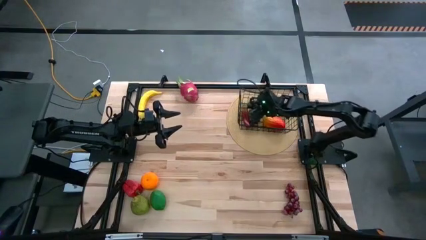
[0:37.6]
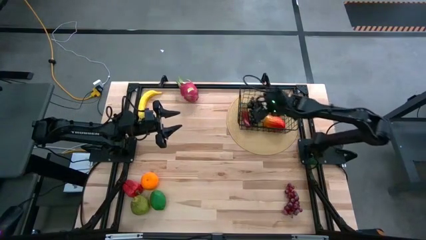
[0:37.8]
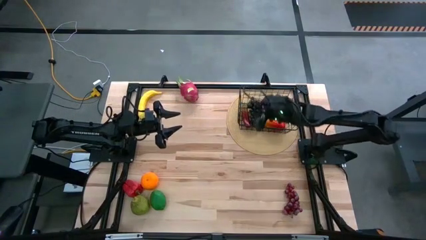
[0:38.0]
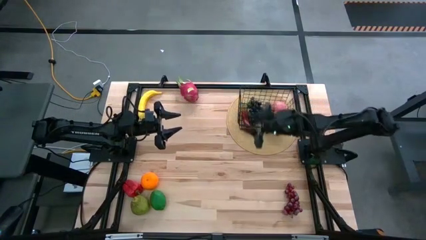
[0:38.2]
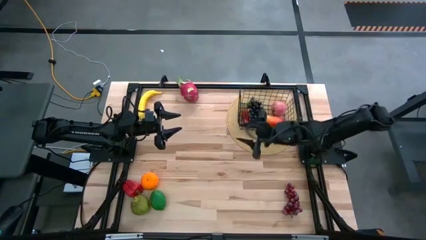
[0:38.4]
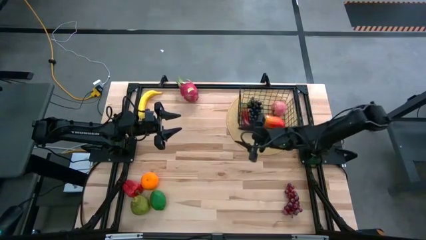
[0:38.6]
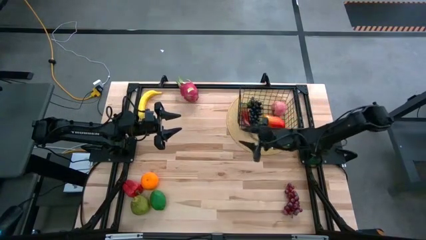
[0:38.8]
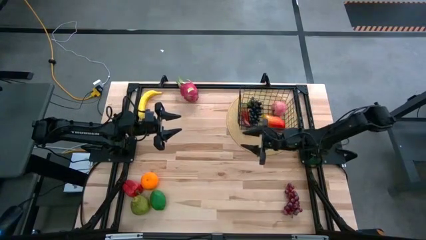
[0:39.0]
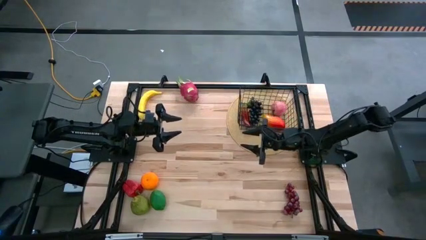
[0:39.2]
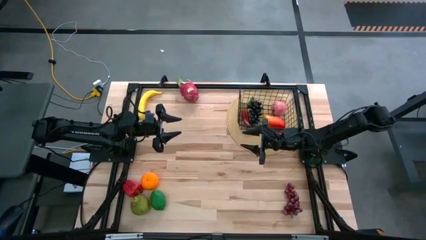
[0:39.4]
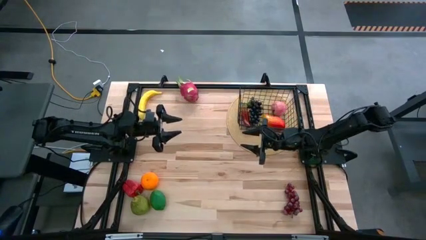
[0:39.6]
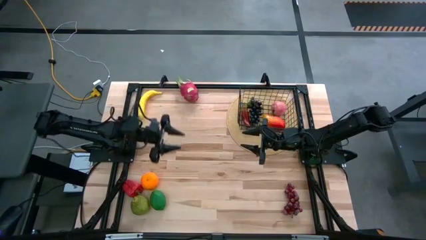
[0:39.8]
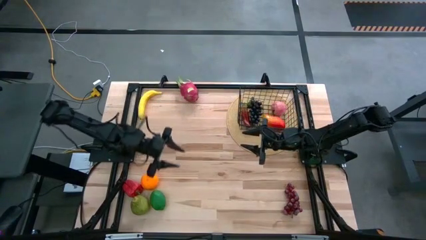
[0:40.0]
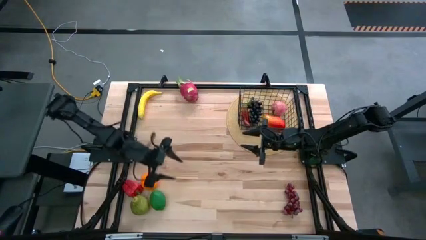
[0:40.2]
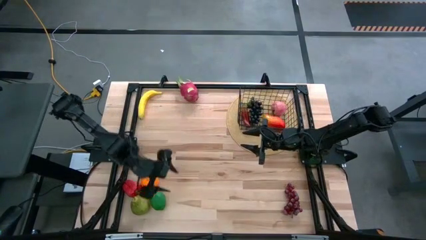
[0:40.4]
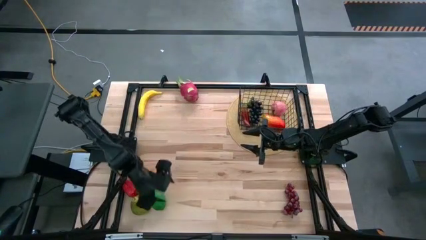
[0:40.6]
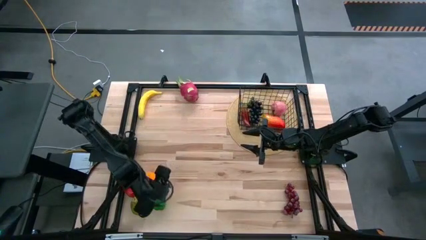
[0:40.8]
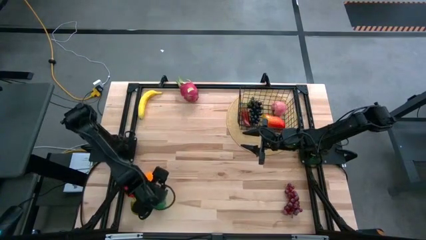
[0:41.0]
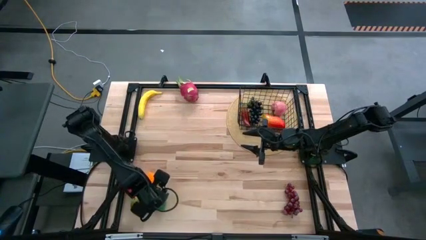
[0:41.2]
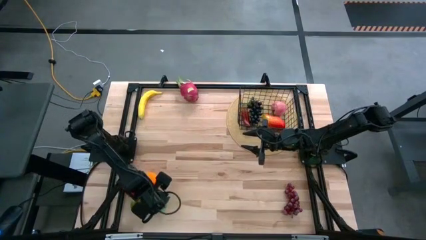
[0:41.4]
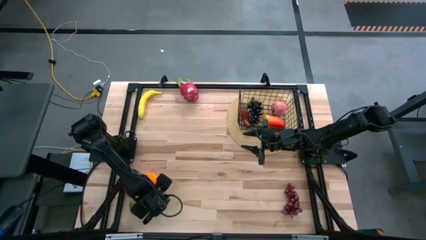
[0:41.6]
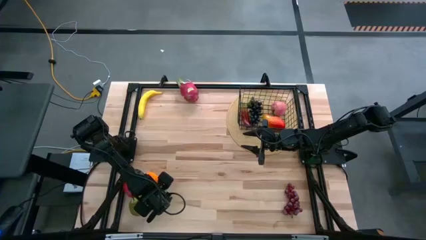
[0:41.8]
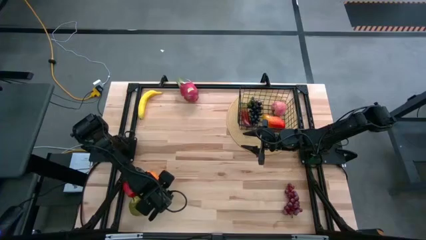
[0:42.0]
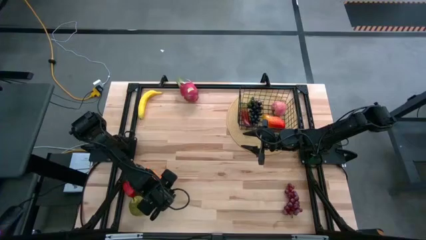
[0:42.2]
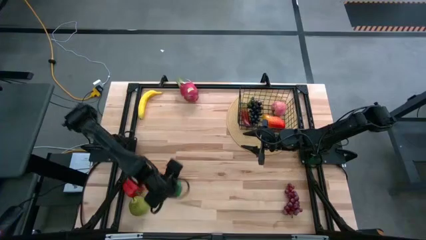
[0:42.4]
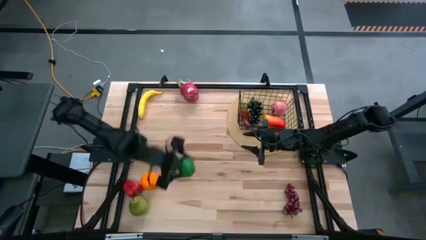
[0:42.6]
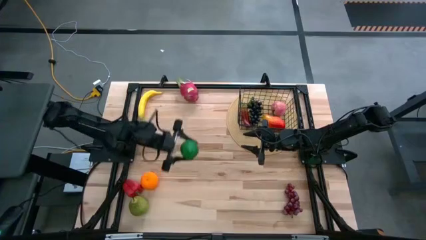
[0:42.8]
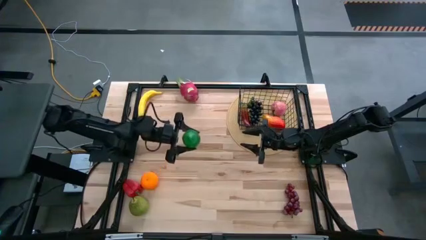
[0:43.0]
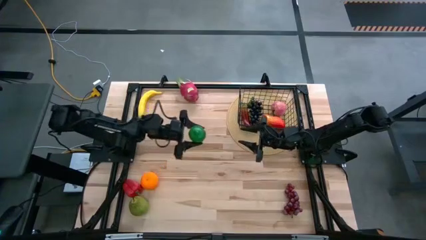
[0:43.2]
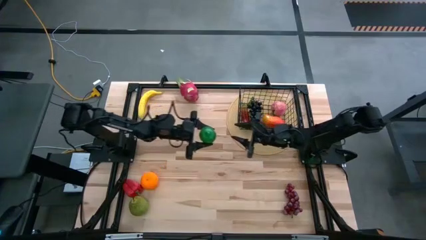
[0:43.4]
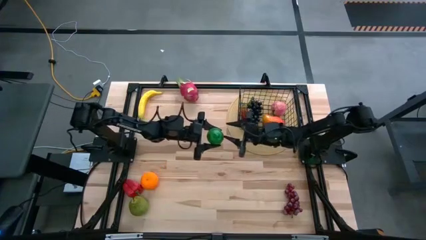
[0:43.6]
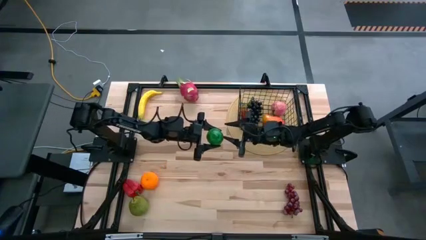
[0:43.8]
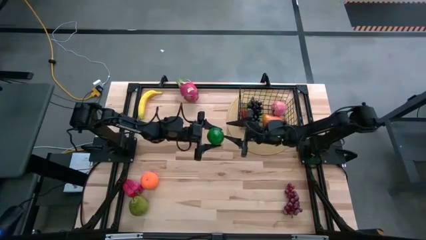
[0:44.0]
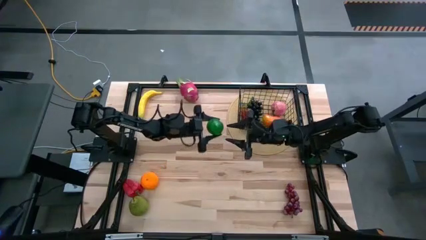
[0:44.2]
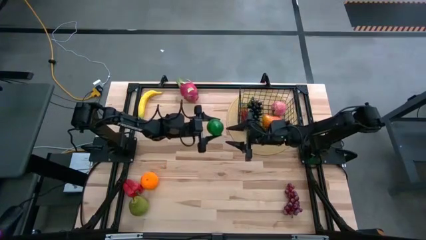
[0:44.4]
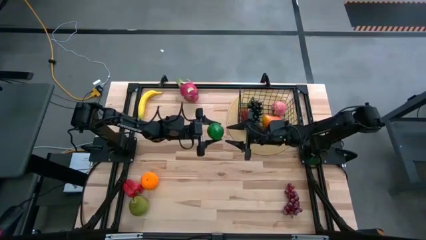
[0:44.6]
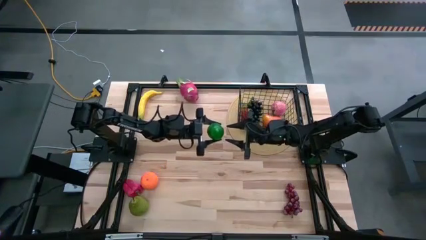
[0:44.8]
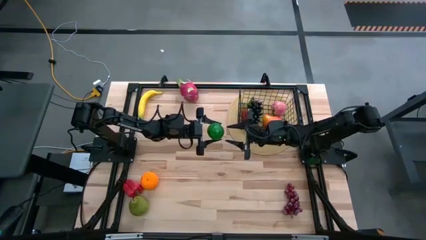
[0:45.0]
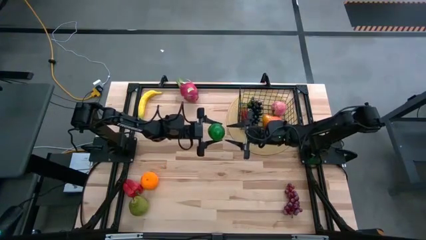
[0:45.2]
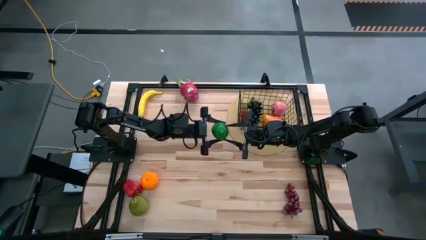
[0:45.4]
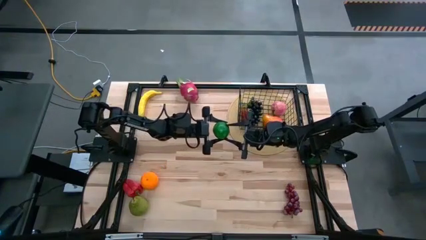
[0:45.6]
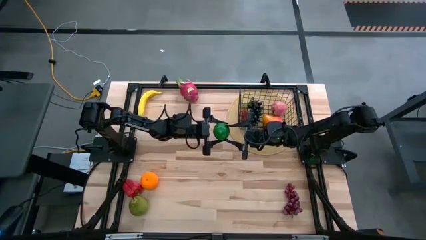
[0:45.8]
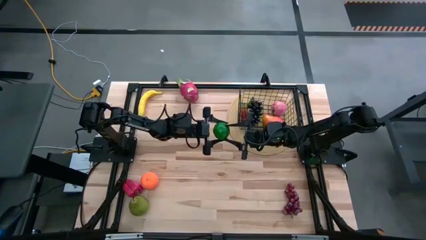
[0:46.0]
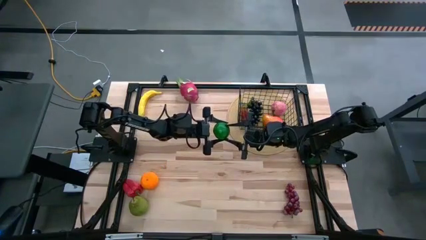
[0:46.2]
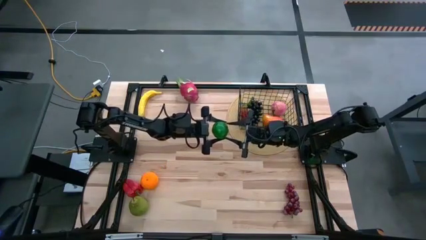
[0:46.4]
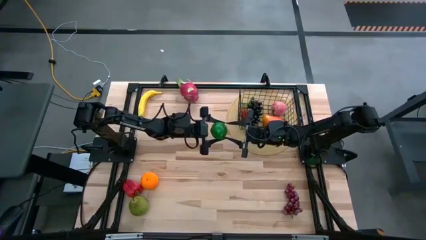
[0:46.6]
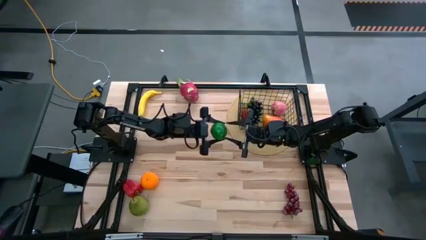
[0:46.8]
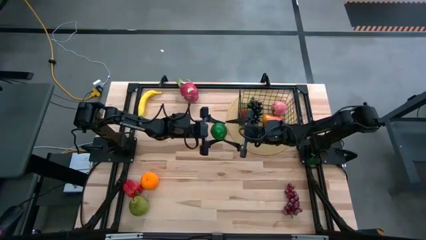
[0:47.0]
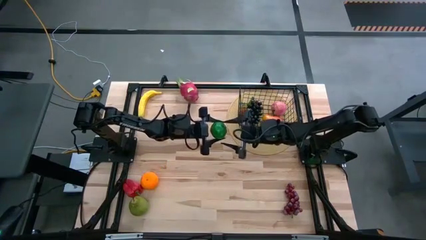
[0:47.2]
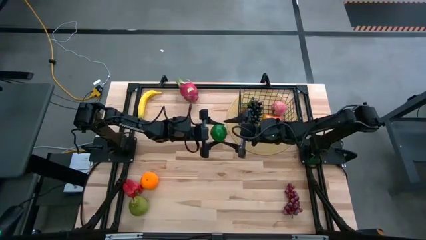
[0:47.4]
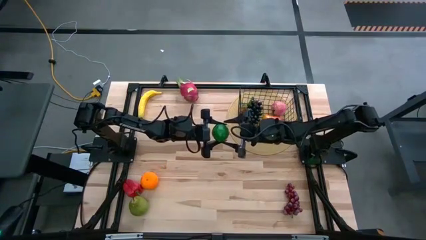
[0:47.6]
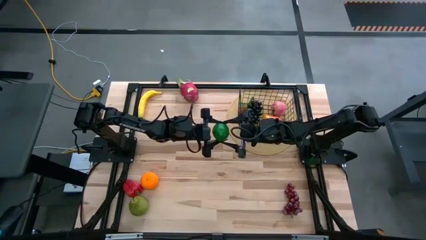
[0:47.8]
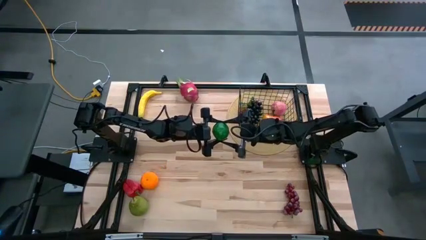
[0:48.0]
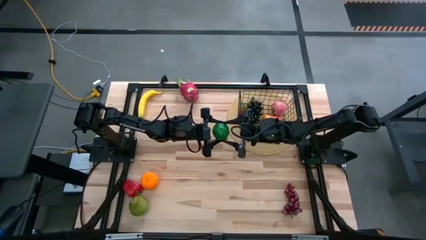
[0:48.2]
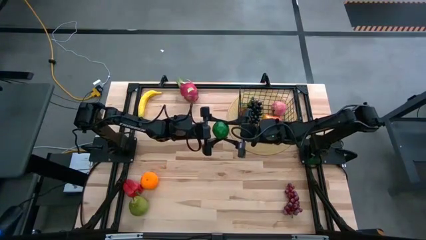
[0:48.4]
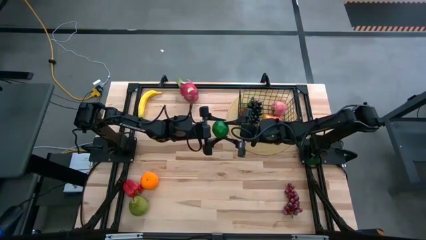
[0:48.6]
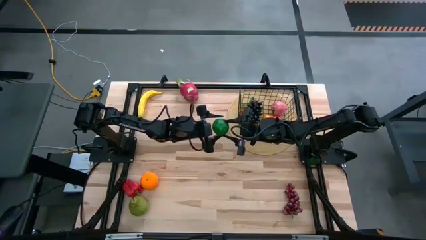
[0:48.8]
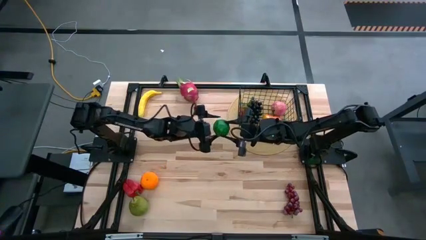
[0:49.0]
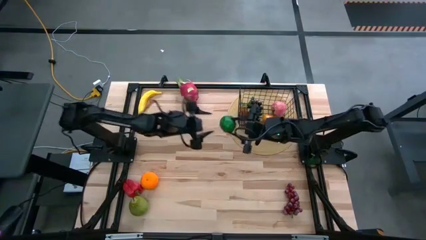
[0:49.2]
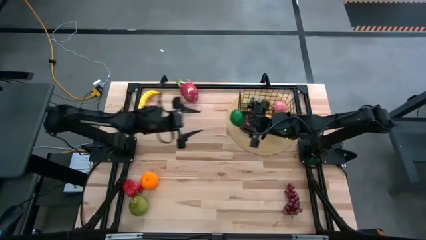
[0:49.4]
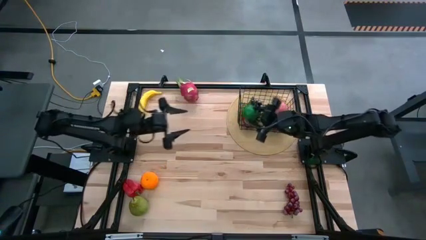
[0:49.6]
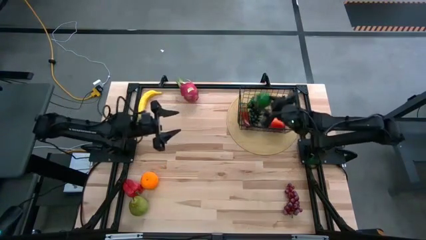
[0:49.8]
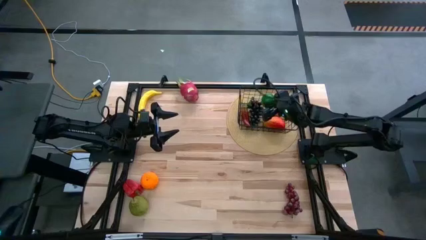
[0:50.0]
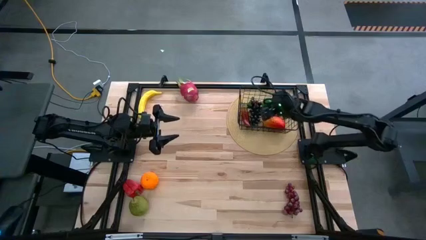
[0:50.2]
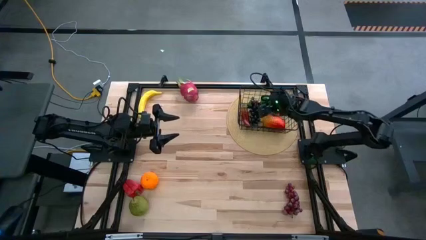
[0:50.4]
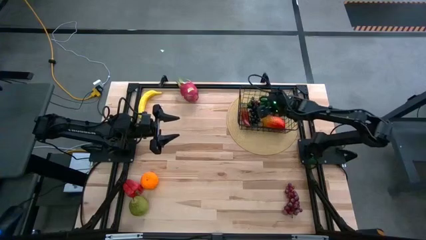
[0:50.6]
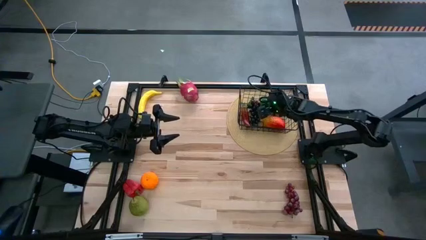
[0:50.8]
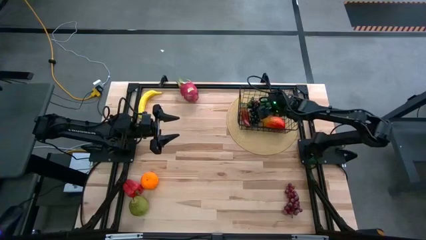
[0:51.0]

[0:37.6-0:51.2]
Task: Build produce basket
Put the lime into the wire basket
